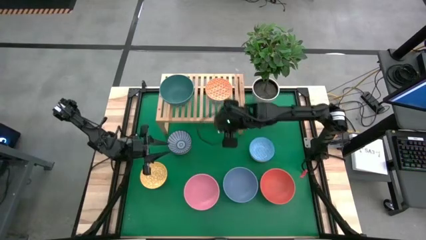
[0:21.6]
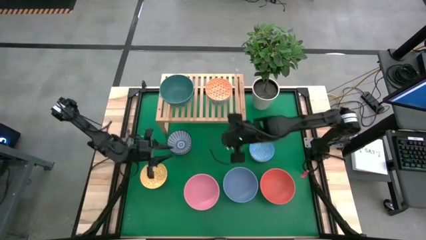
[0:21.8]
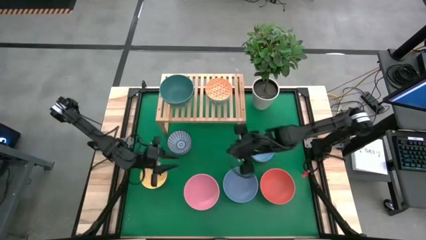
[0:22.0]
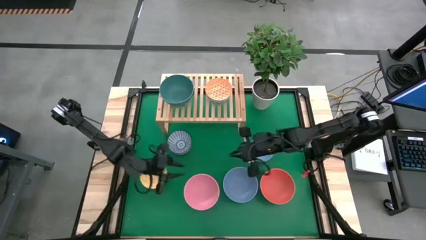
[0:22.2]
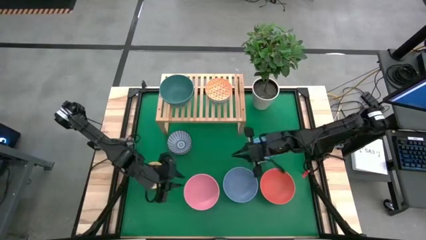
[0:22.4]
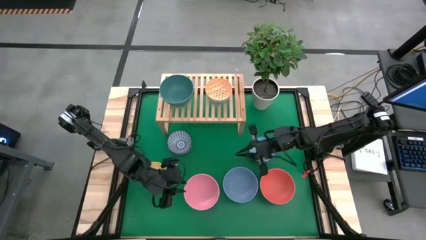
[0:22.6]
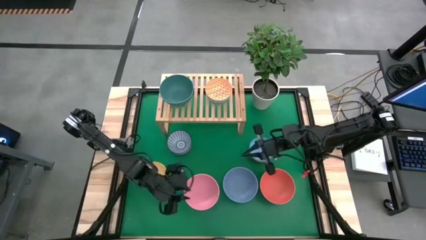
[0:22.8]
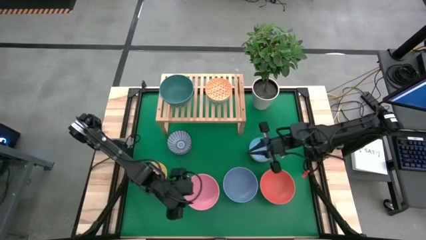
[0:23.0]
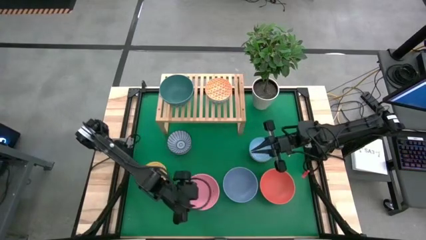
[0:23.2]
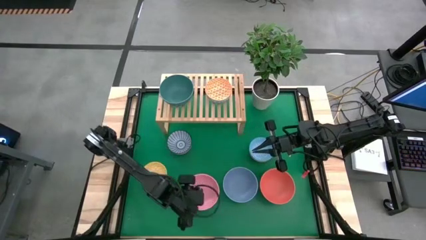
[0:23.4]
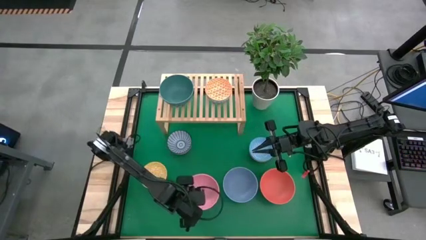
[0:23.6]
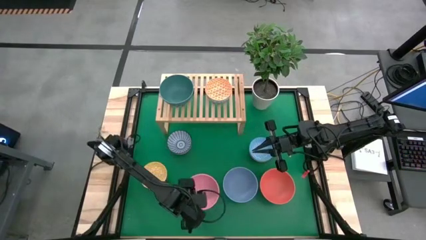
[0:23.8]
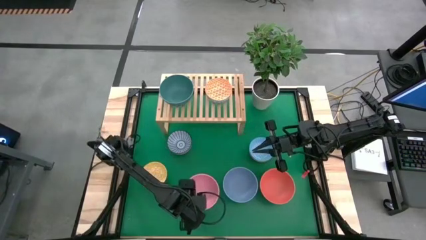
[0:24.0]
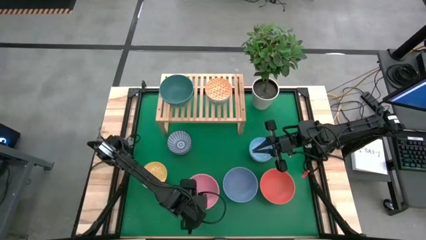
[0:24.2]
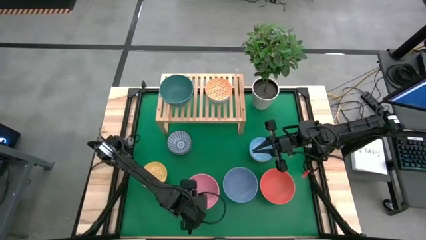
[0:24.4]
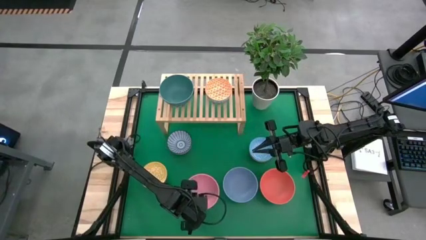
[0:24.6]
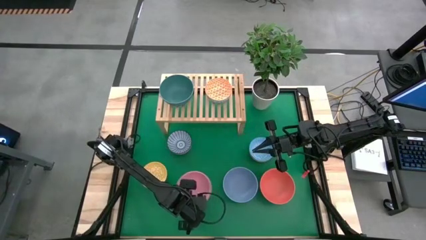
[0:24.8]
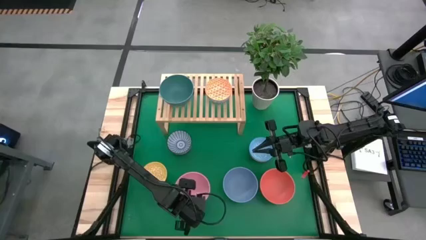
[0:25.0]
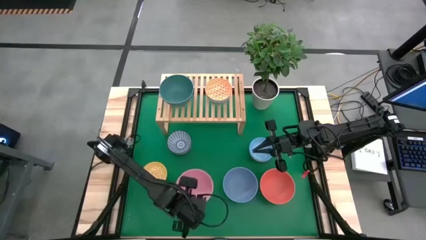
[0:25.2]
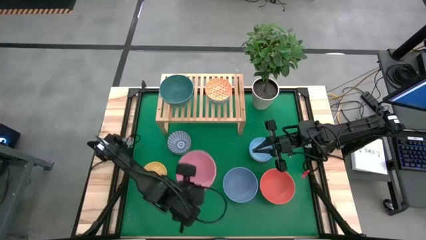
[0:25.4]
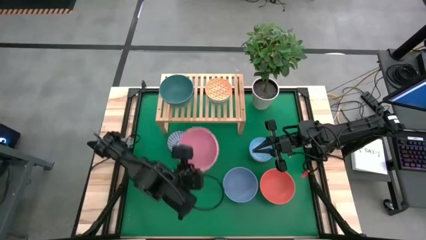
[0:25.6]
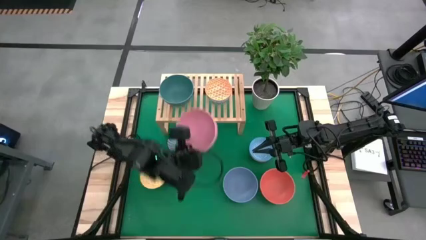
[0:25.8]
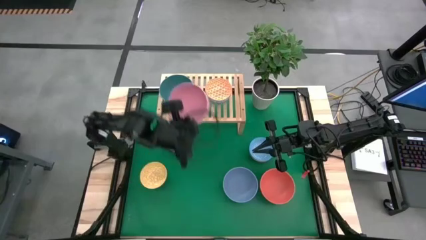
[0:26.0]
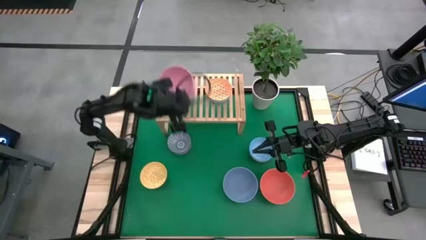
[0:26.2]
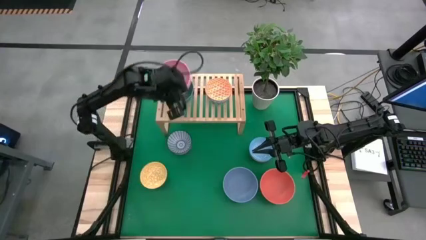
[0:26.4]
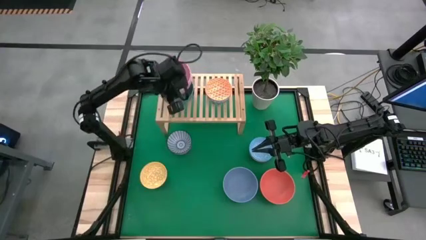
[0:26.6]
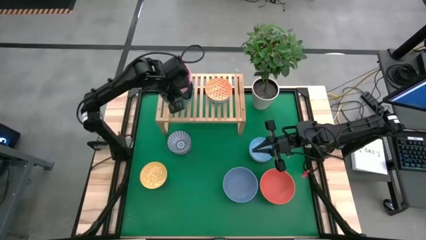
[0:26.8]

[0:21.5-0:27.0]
Task: Place and stack bowls onto a shelf
Stack the large pink bowl on the large green bowl

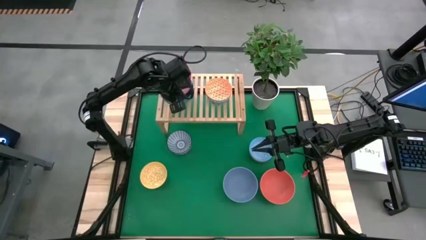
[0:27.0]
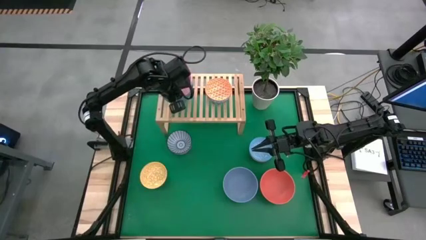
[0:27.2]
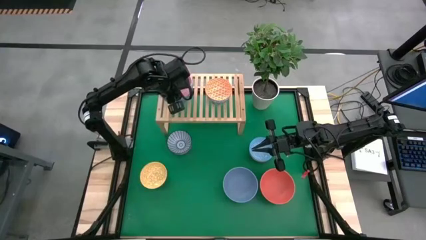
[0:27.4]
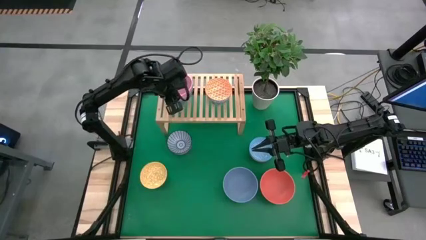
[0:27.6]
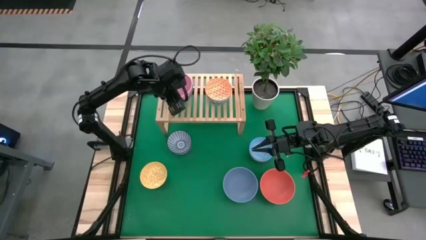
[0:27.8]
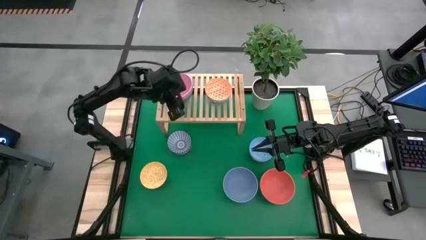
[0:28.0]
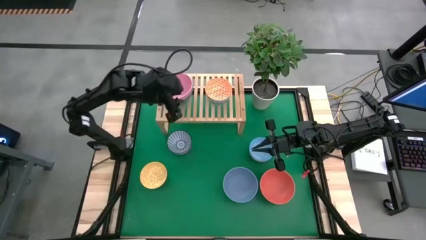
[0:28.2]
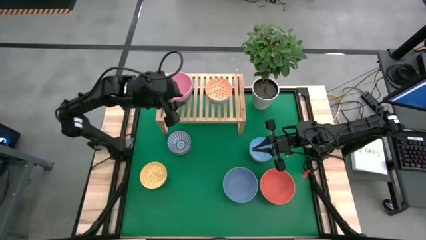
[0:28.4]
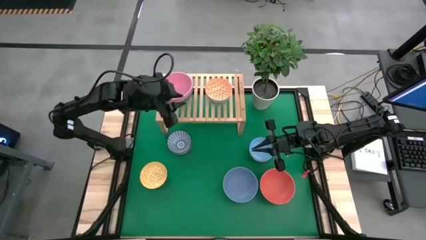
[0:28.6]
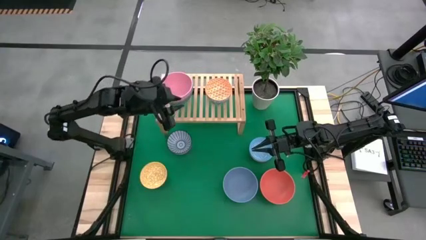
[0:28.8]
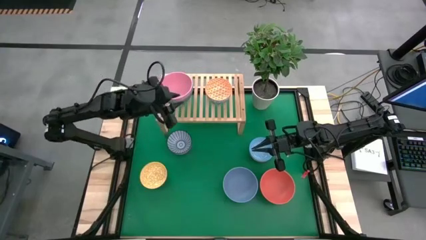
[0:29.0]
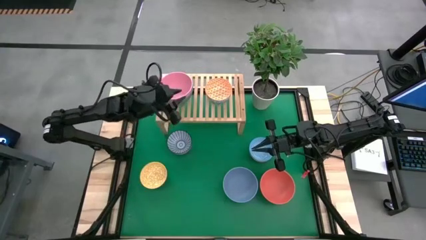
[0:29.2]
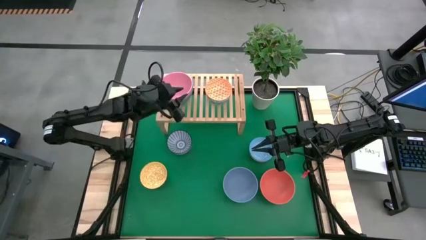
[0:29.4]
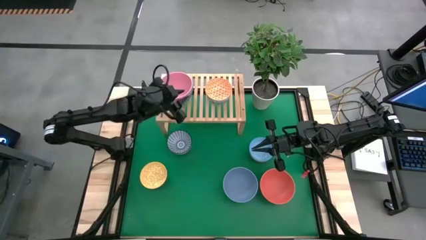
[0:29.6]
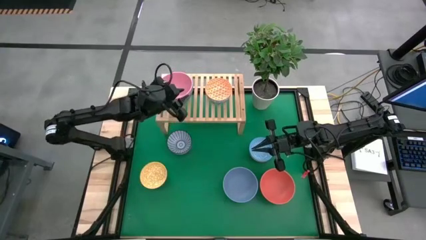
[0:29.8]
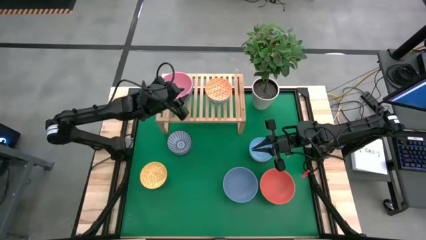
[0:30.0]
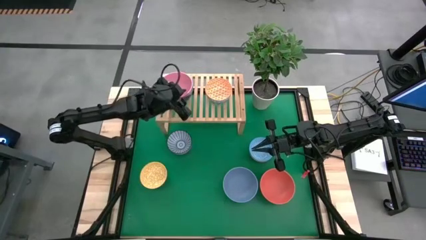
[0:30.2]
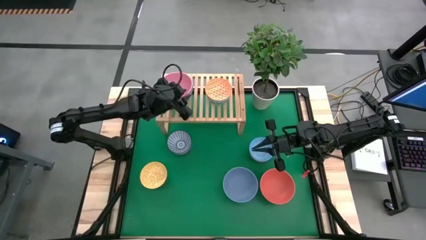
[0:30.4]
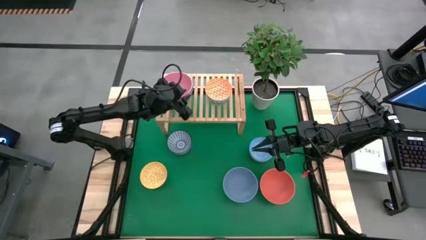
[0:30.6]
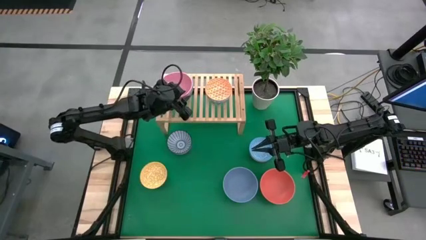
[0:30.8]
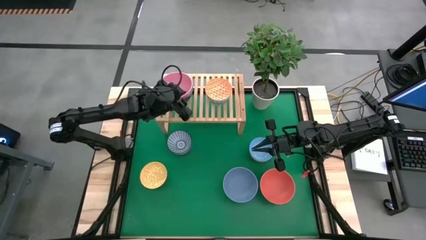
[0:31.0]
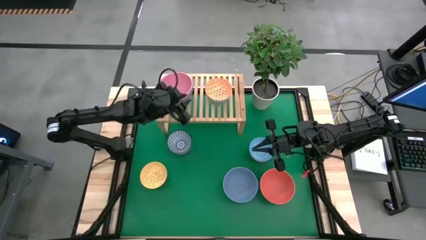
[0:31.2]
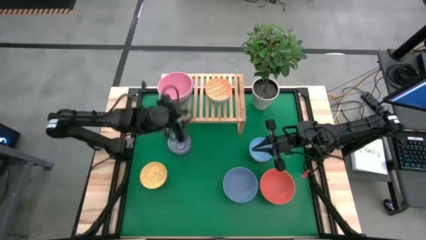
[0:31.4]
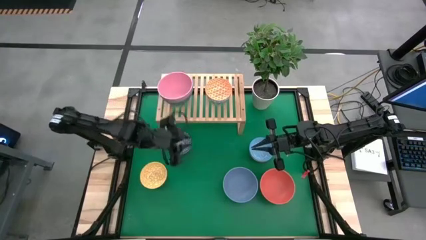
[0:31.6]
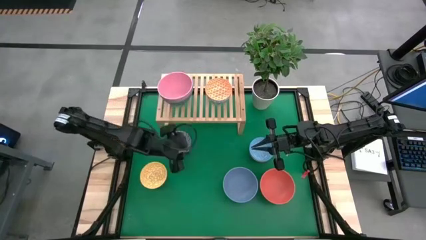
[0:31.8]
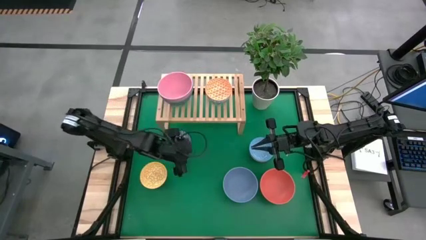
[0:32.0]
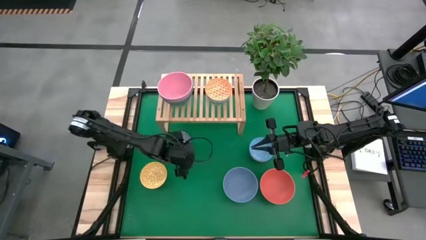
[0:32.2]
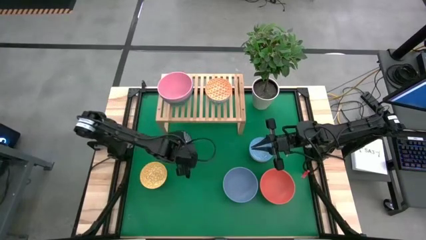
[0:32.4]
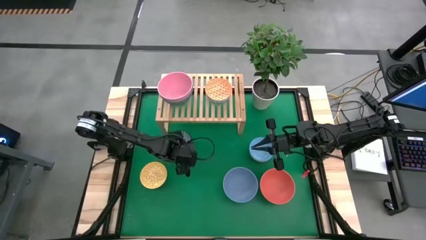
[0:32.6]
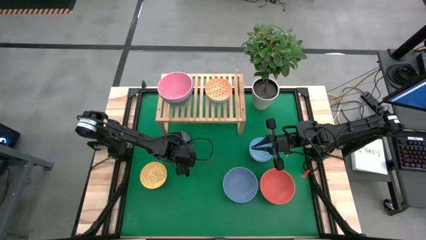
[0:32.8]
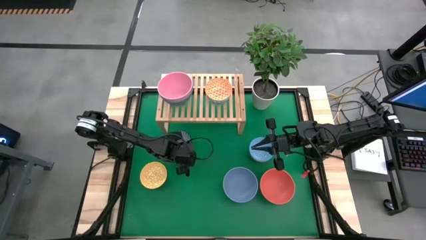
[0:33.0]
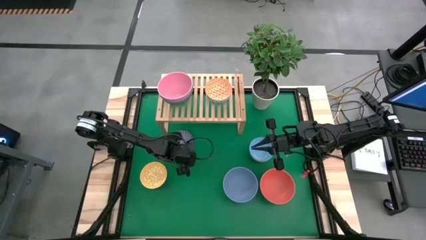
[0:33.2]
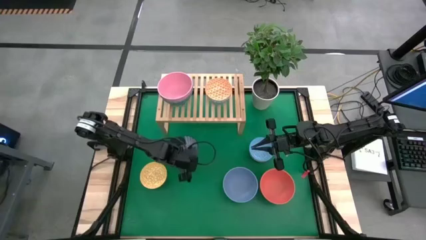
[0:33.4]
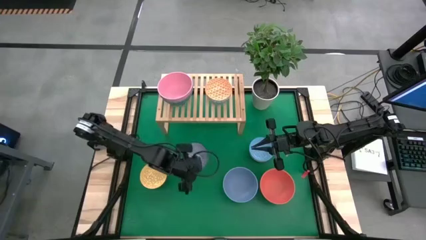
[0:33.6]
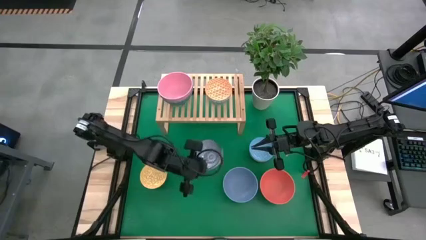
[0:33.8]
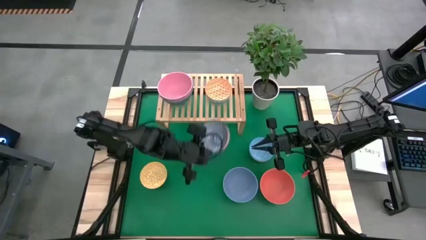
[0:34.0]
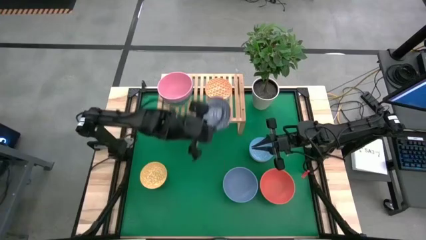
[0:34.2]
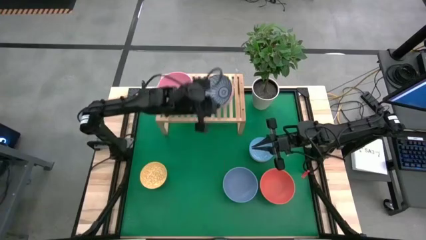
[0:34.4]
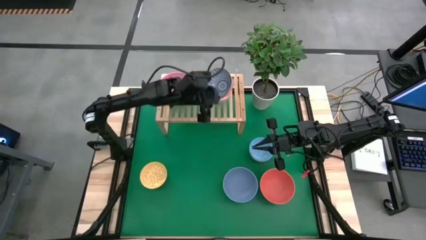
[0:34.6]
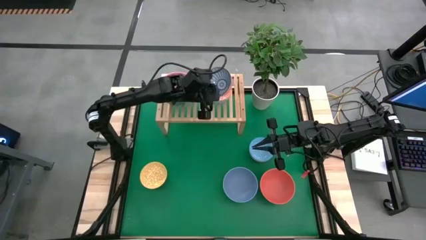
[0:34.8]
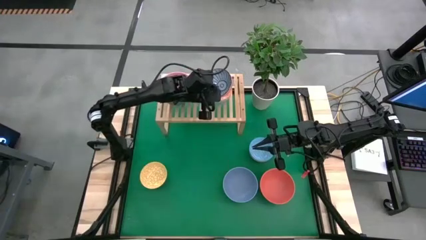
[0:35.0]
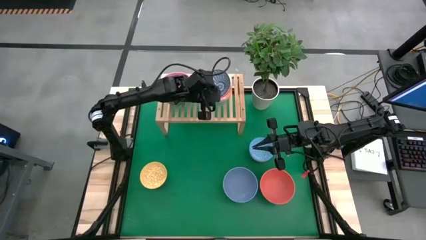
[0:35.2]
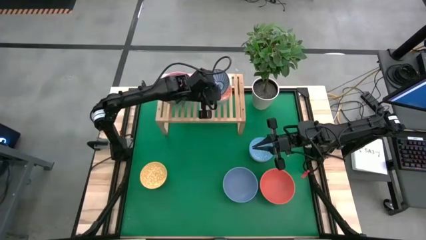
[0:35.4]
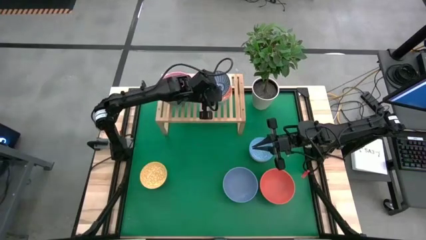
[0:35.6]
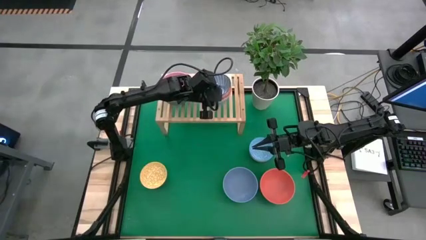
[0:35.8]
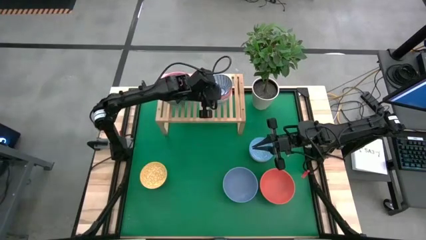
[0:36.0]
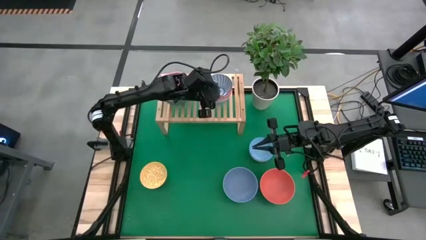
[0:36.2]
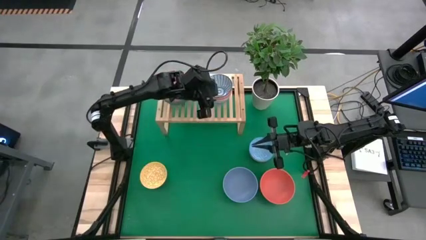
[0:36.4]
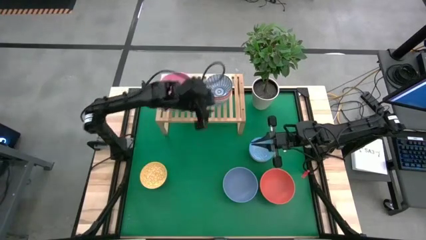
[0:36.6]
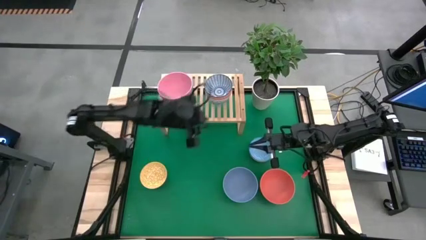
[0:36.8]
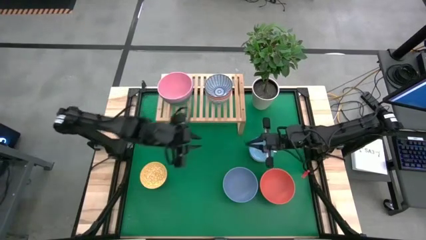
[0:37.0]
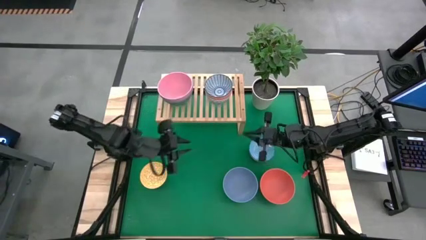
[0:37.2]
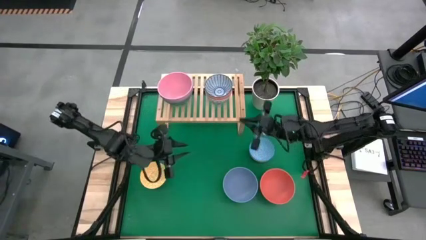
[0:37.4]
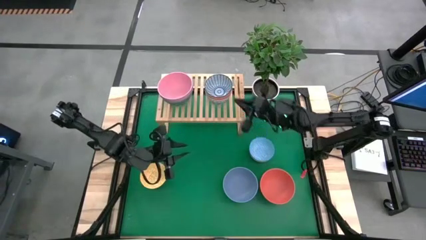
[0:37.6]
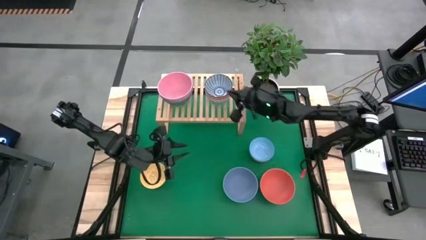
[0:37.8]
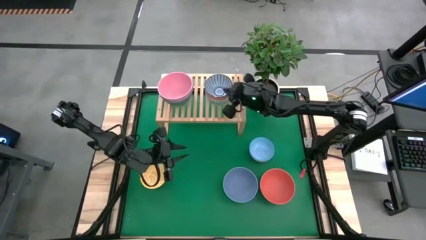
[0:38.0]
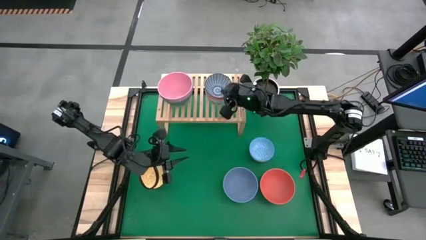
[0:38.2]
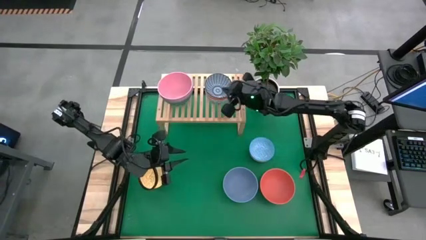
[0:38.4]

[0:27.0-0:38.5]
Stack the small blue pattern bowl on the small orange bowl
